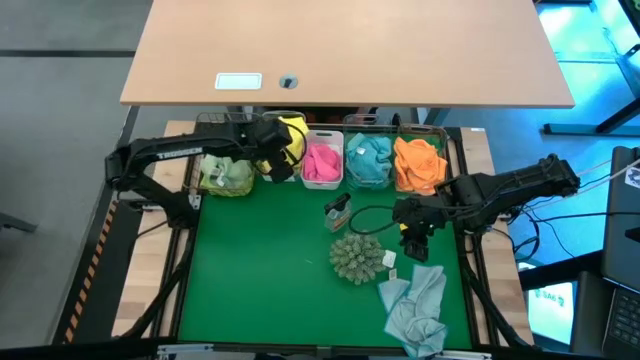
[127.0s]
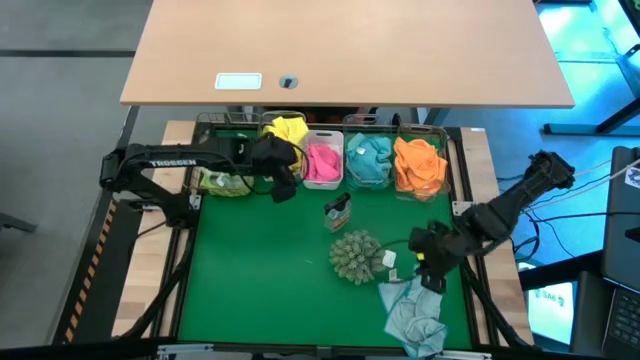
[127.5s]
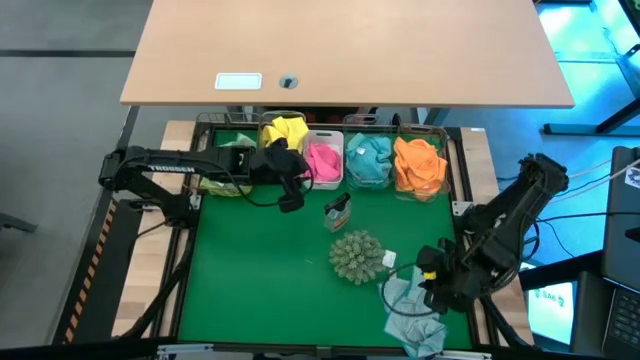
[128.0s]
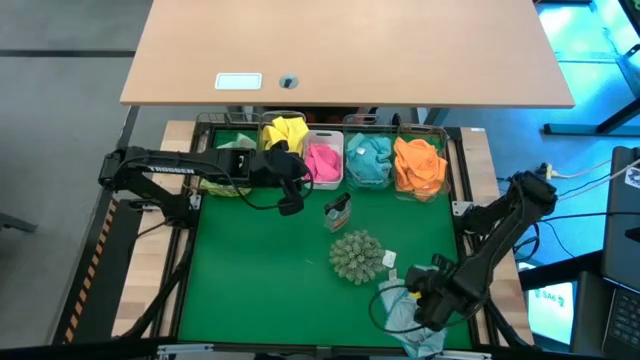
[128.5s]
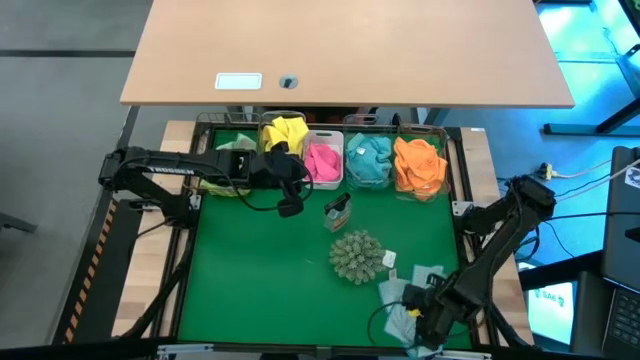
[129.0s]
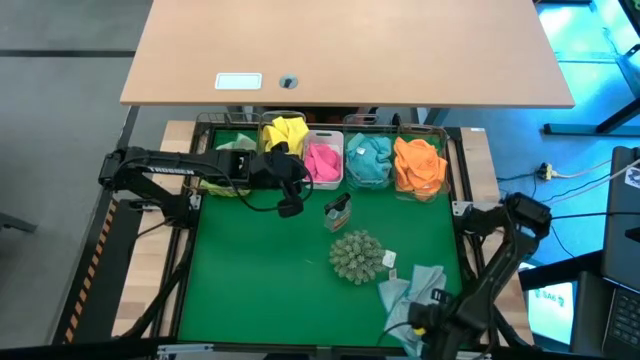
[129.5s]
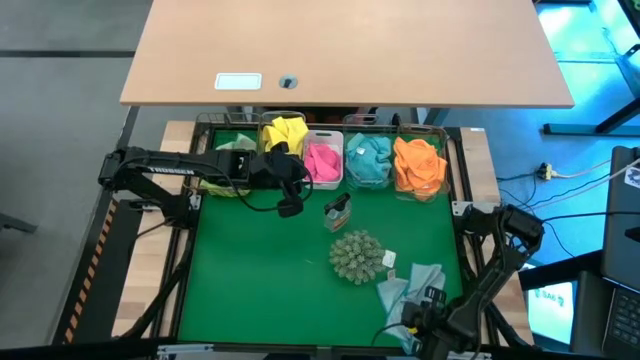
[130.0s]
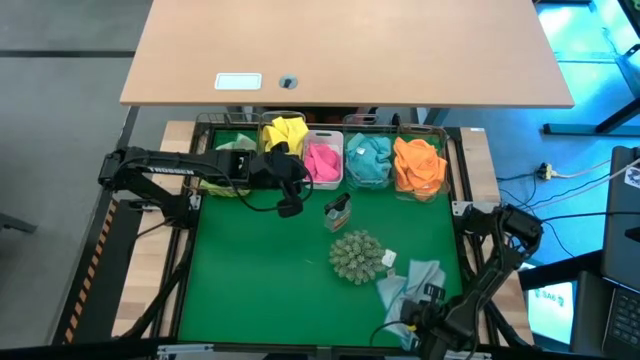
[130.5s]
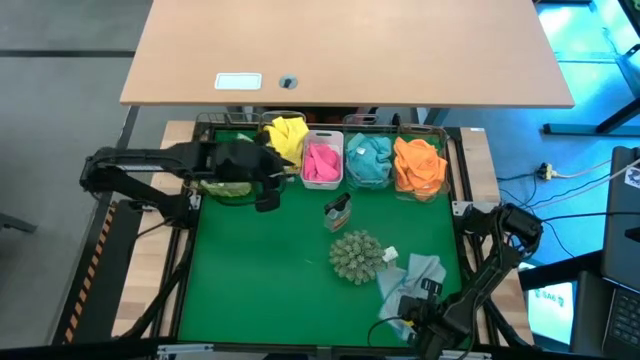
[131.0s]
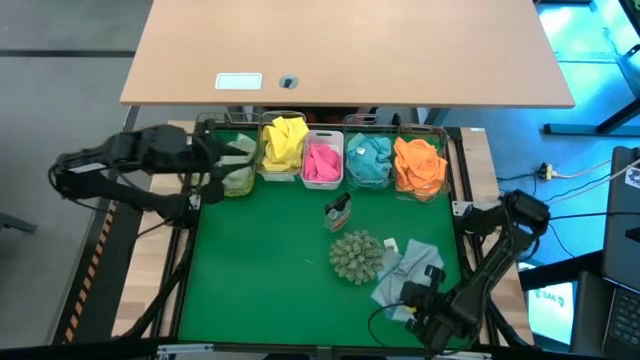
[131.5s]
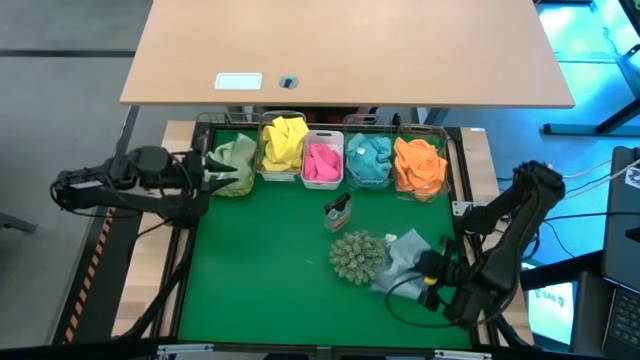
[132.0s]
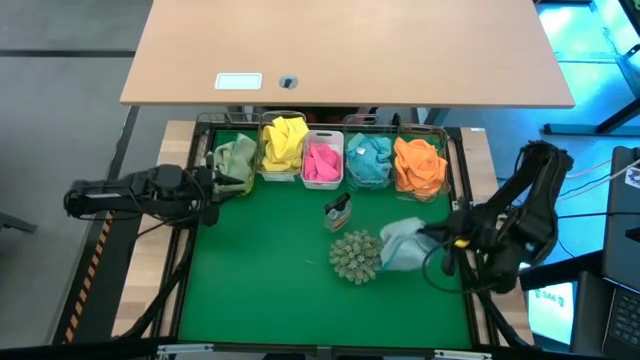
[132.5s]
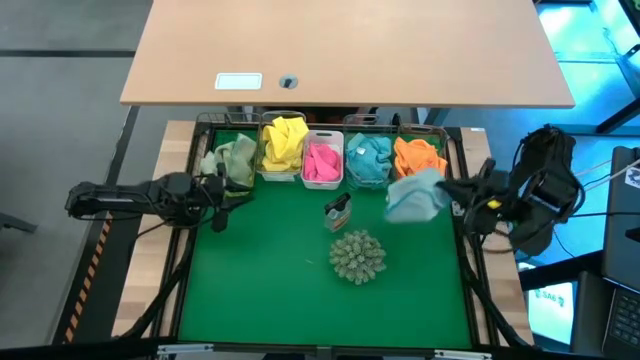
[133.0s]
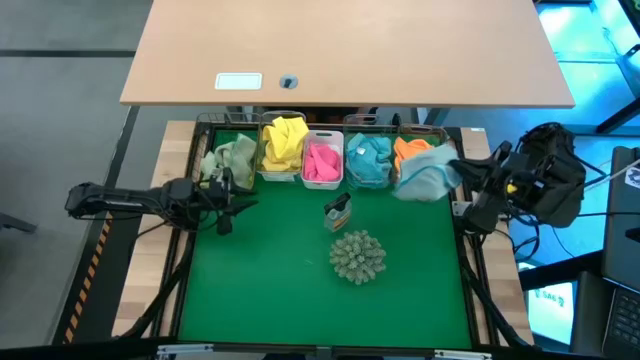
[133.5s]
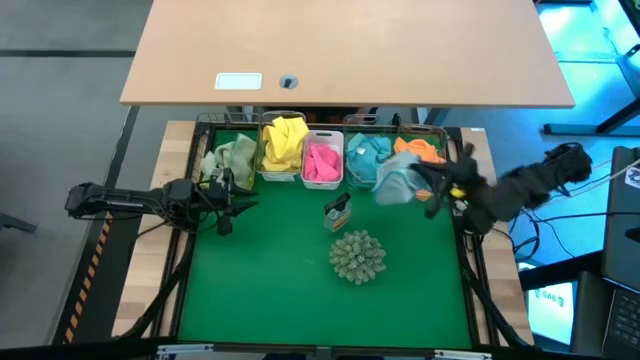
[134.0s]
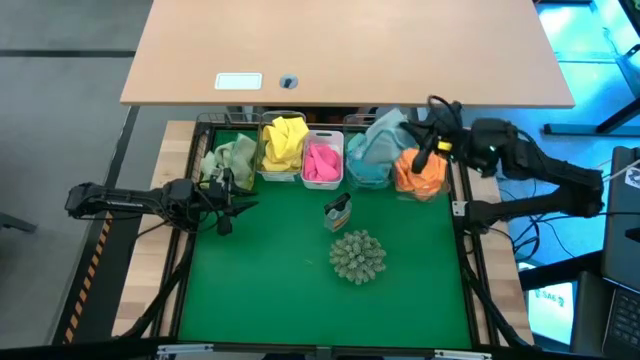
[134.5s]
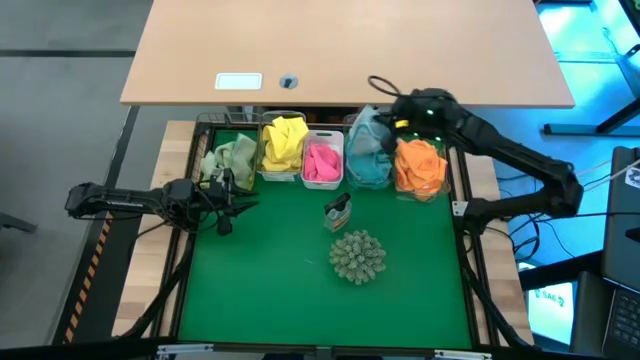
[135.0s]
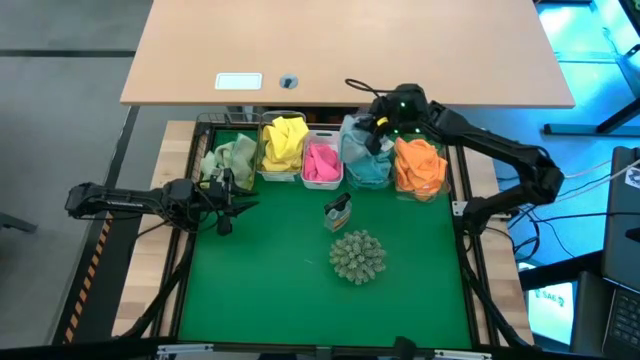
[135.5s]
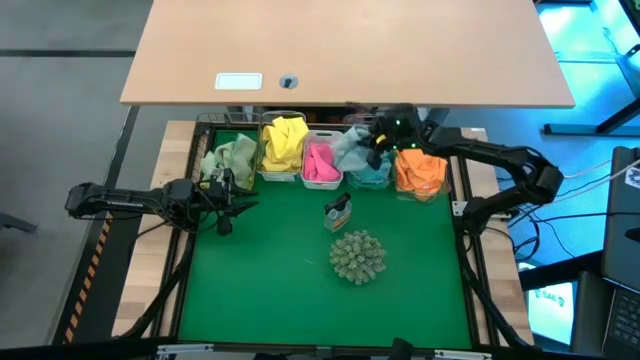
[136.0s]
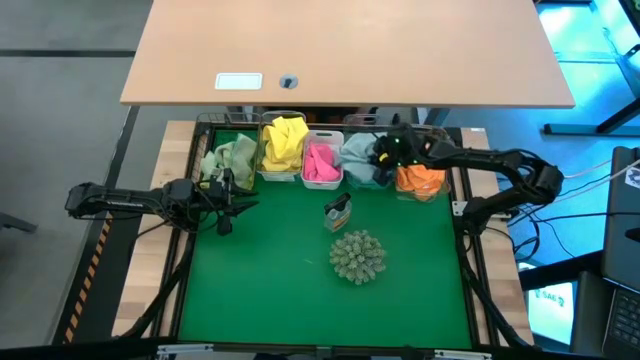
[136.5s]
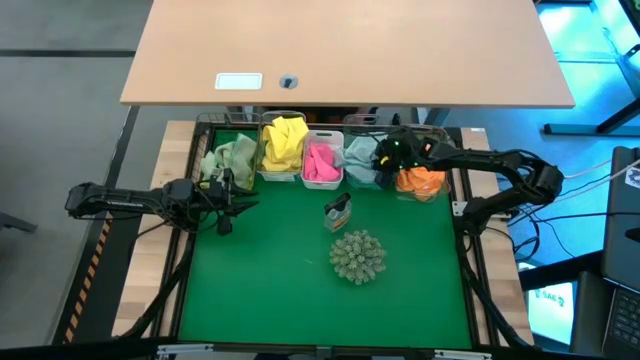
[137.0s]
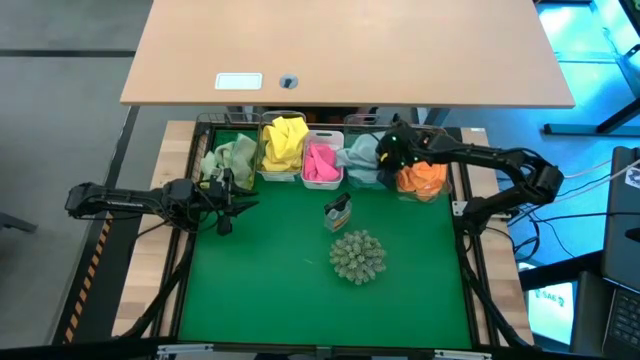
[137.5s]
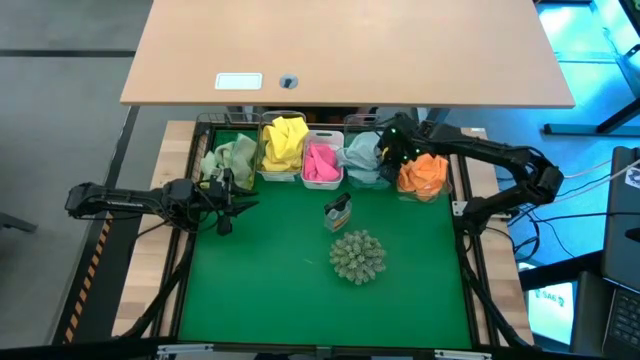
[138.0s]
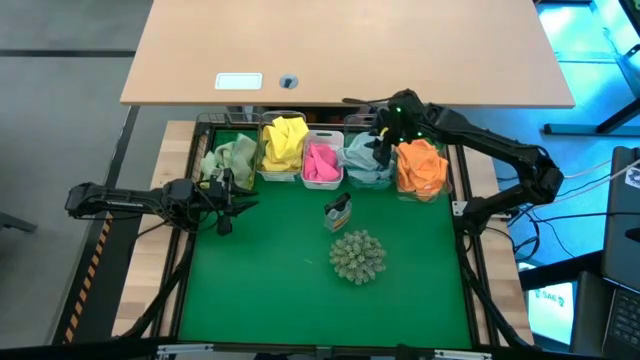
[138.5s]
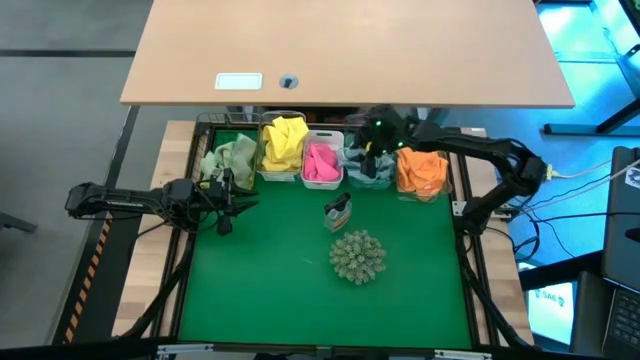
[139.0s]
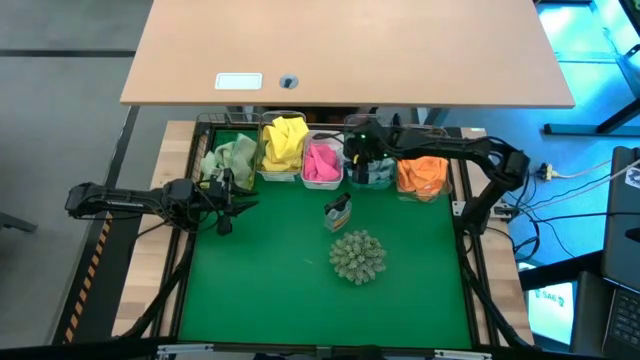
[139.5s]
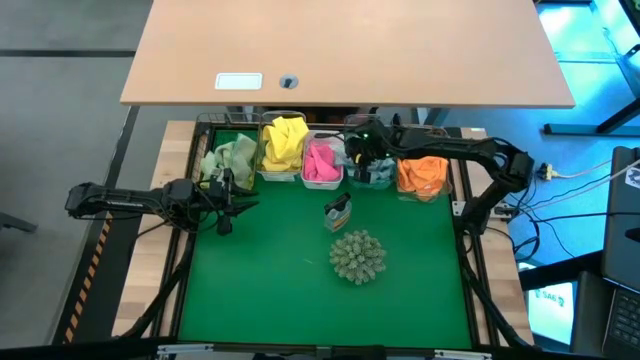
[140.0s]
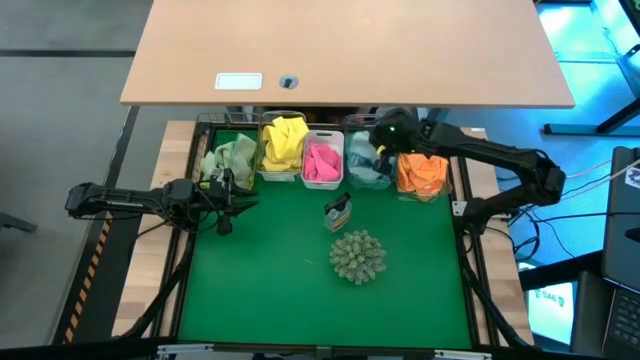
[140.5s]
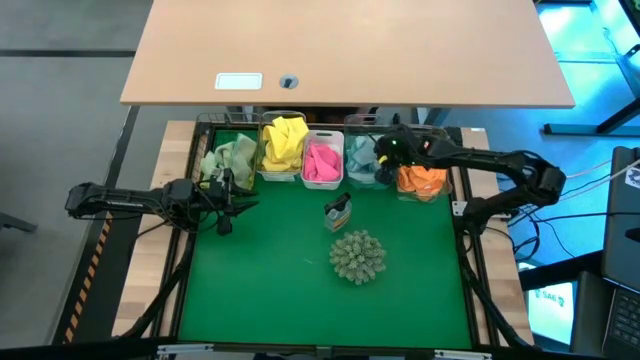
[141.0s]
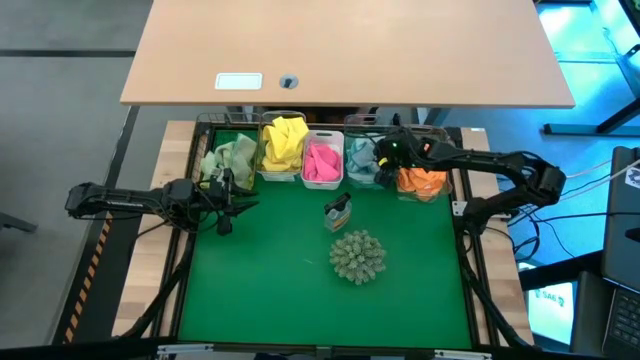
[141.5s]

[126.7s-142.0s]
Task: Sort microfiber towel by color & place in baskets
Put the light blue microfiber towel into the middle transparent bin

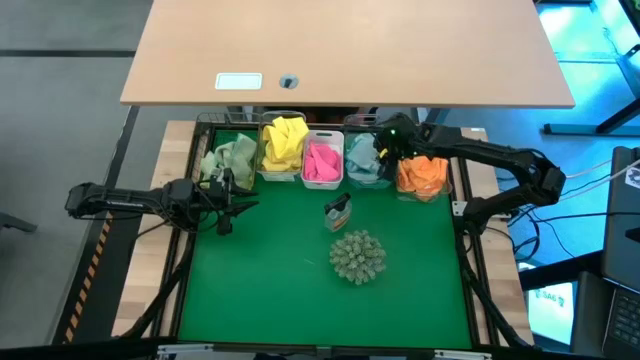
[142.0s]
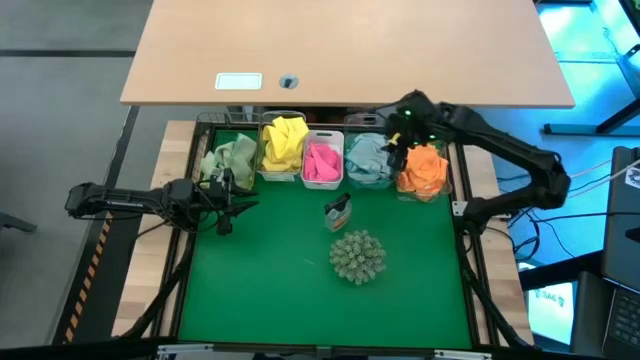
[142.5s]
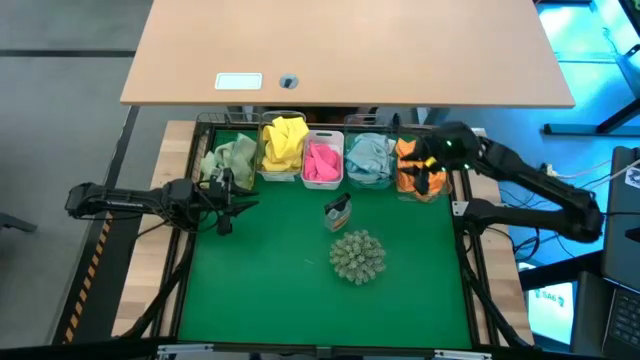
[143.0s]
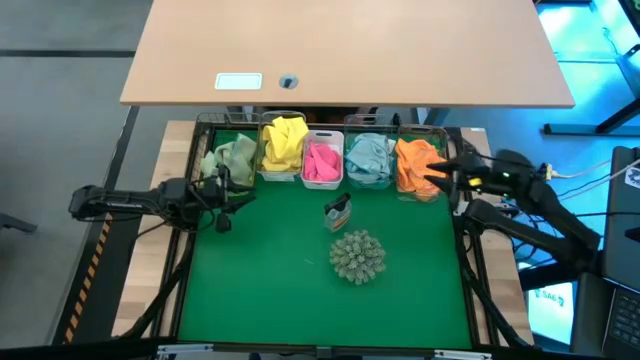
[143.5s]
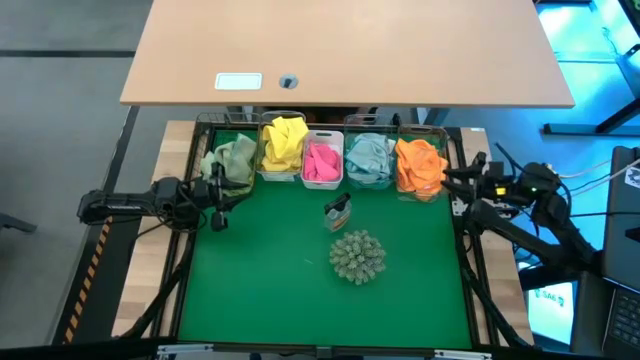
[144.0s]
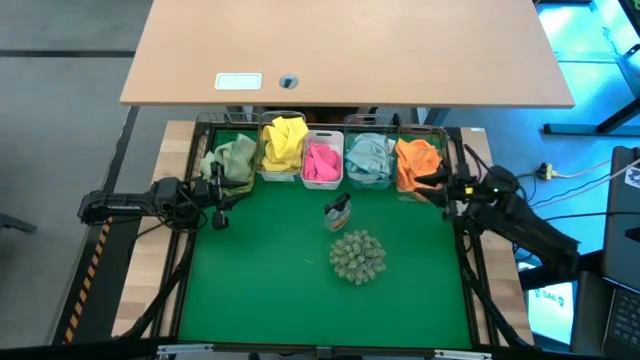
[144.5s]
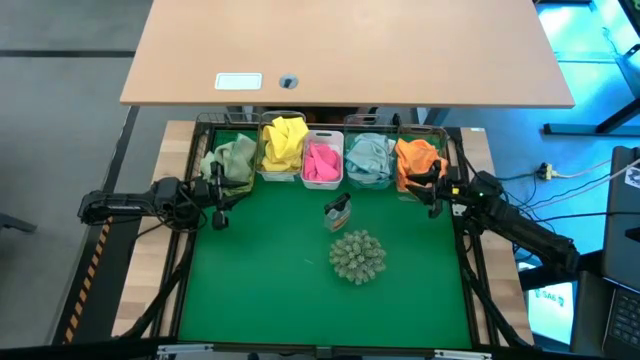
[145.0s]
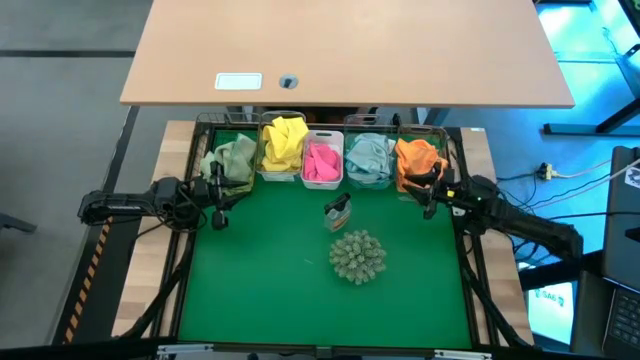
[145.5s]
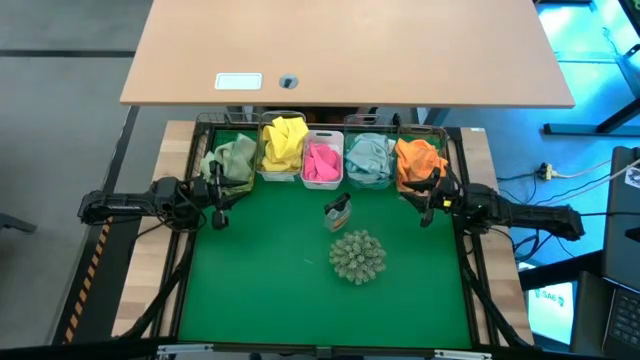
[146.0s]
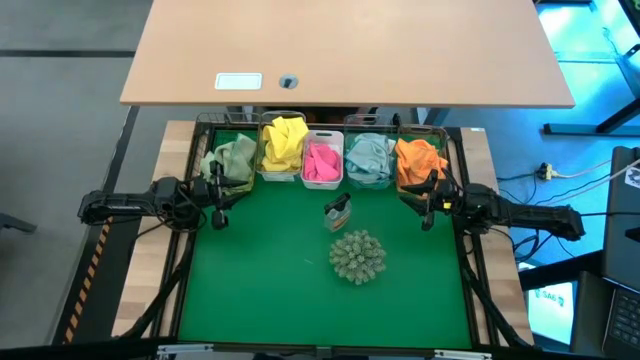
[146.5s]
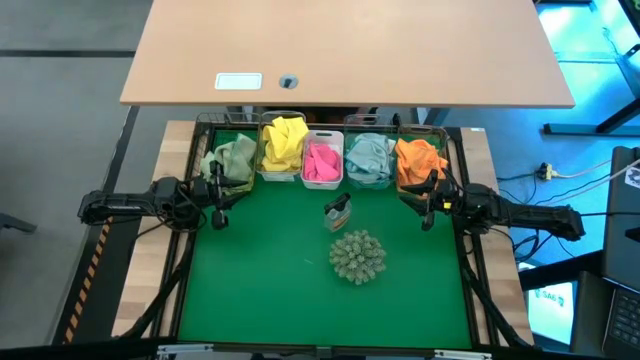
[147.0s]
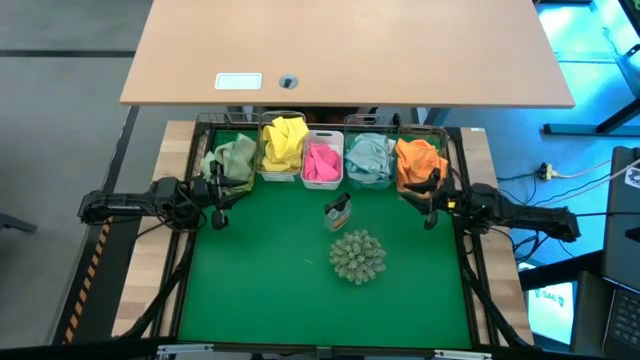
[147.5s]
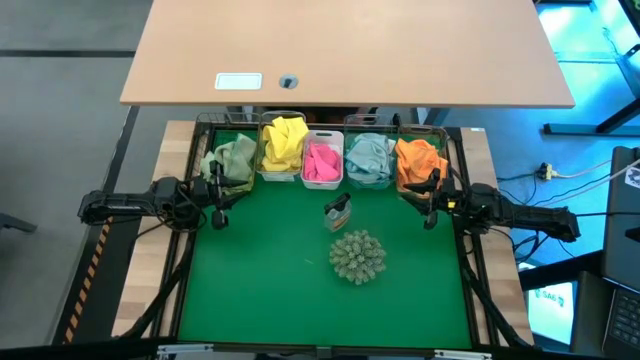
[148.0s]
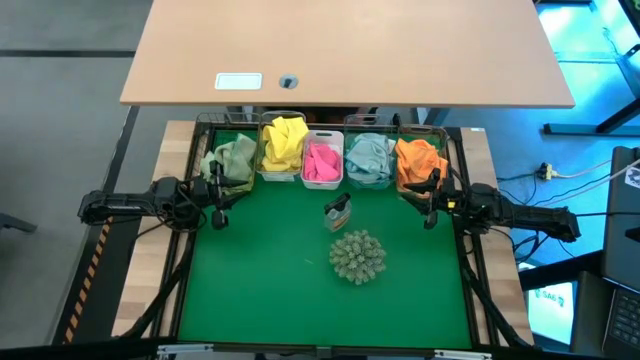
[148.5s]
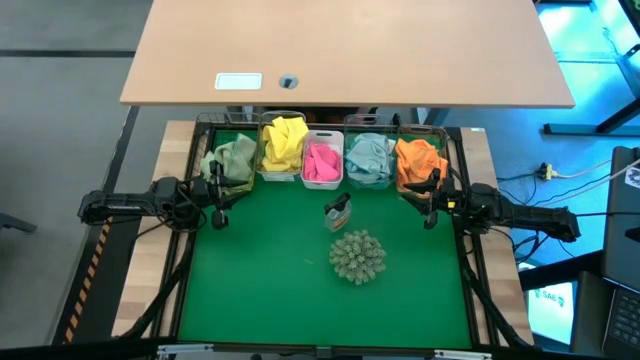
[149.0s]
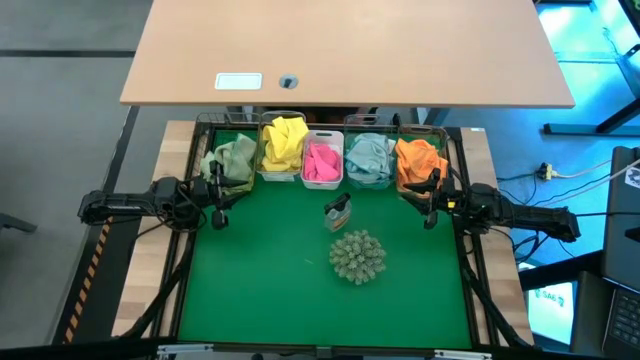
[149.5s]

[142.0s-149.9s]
Return to Home Position
